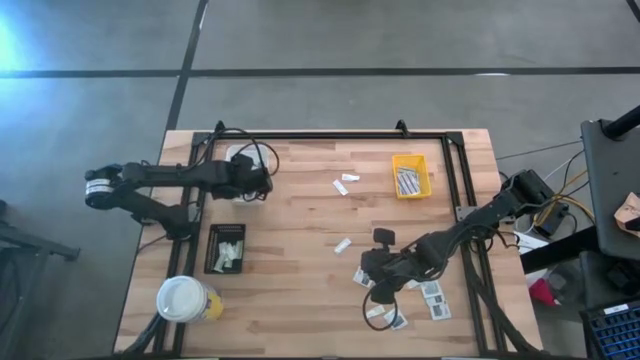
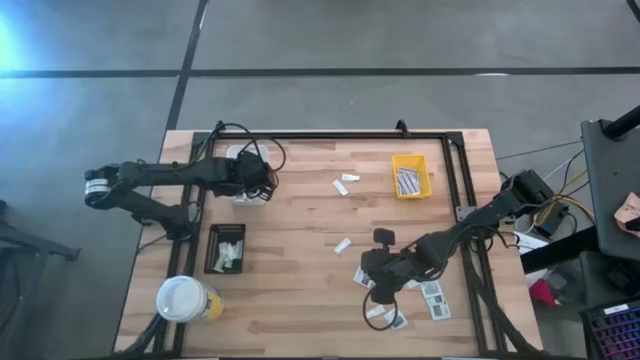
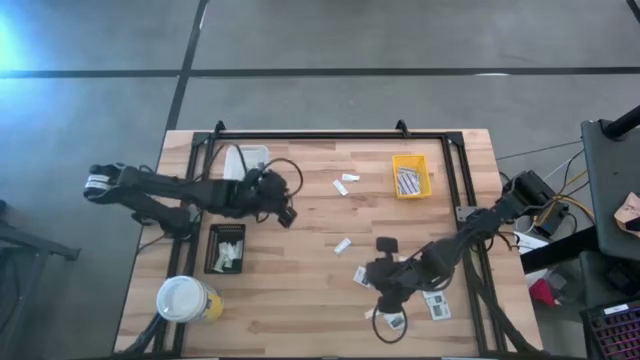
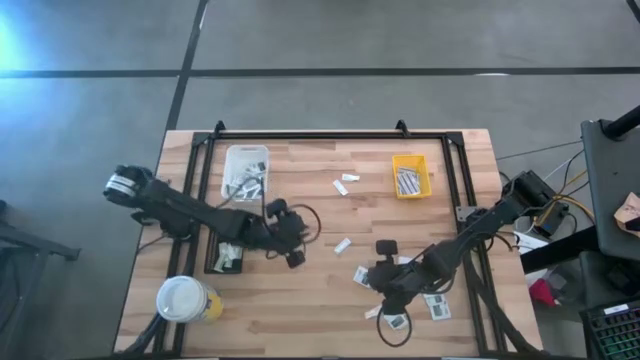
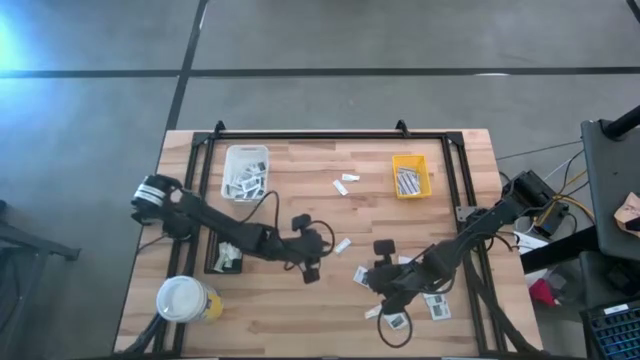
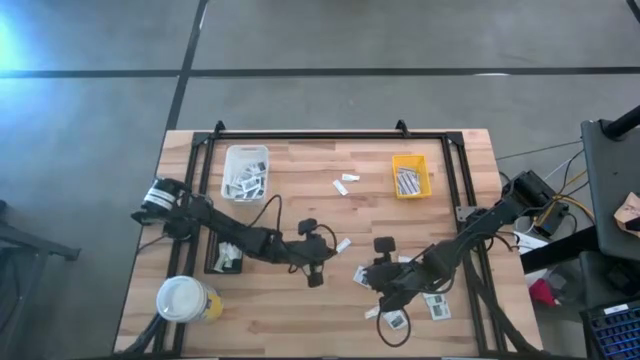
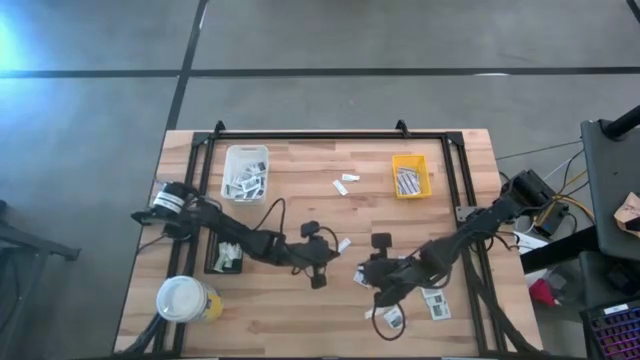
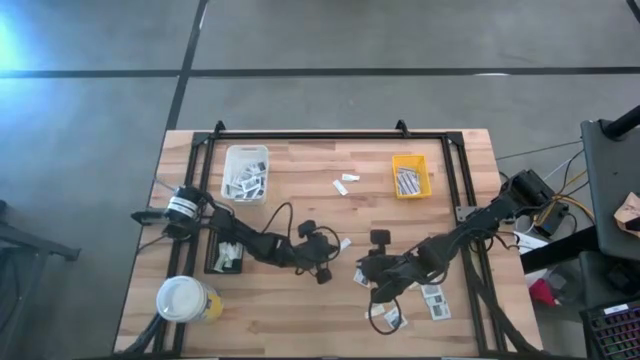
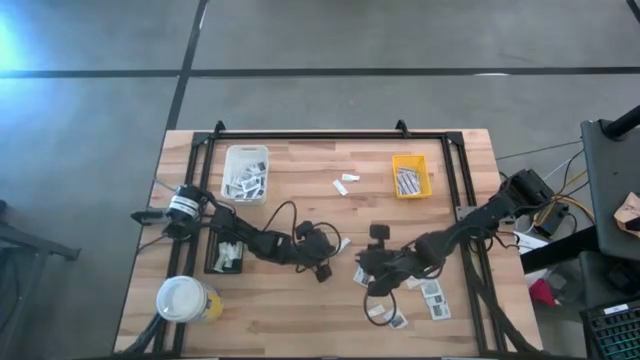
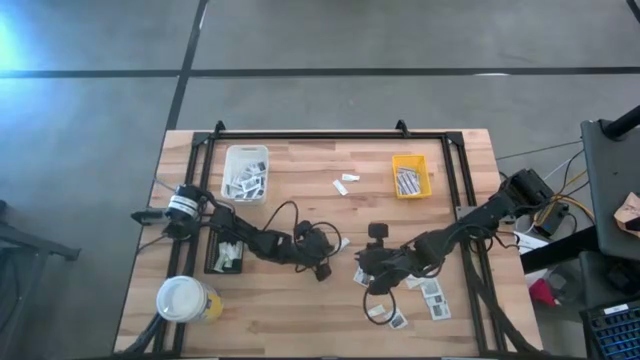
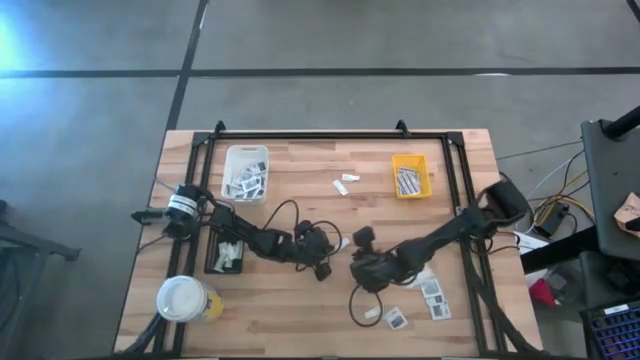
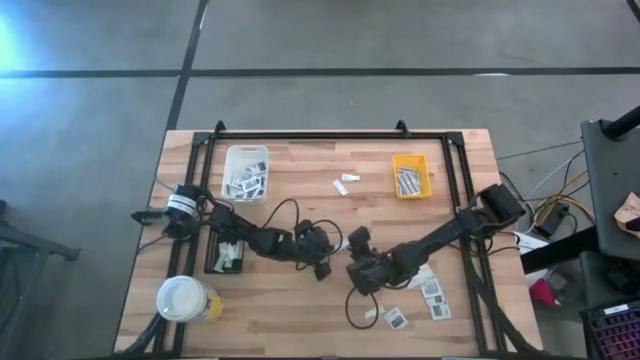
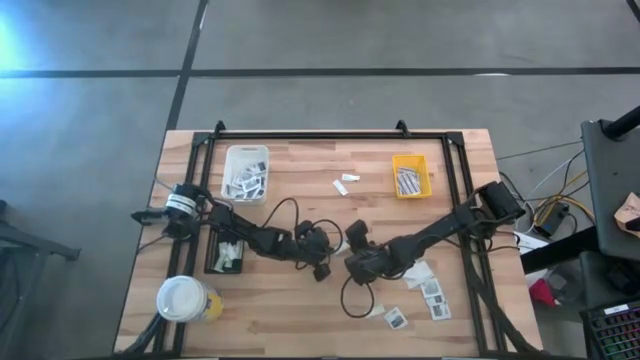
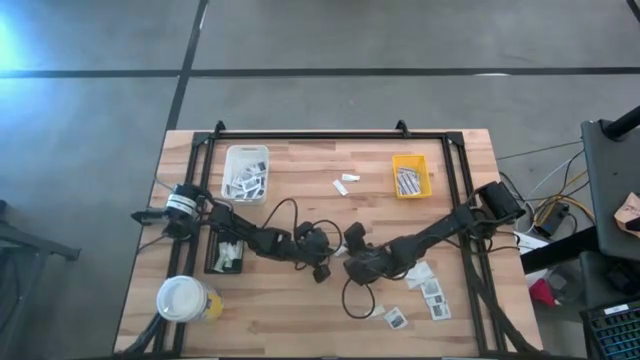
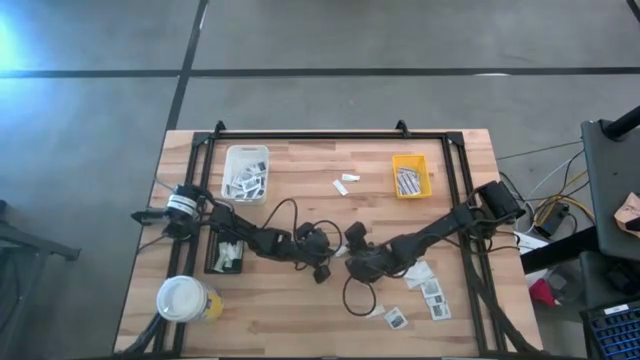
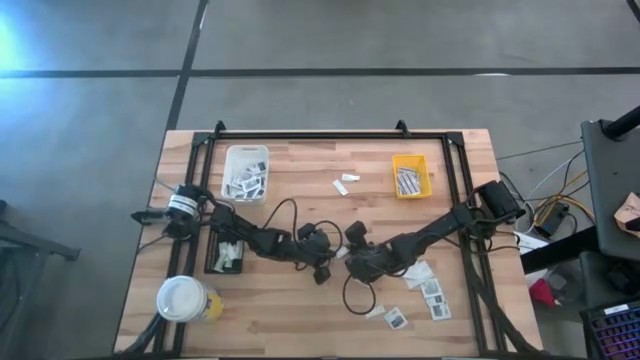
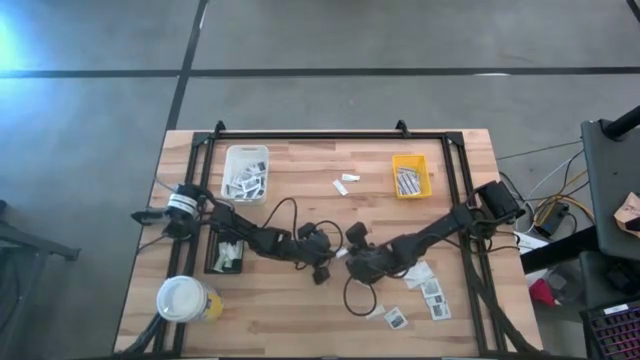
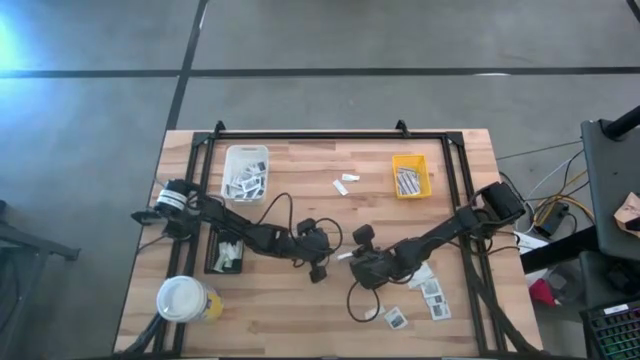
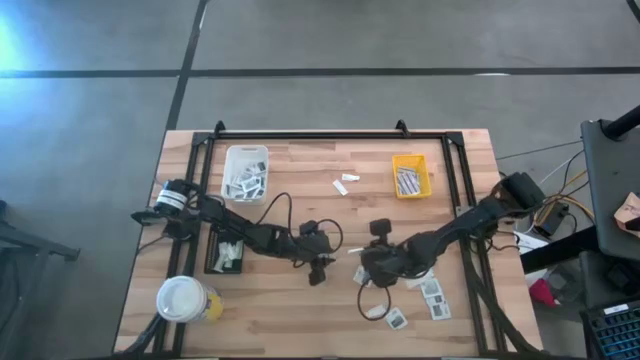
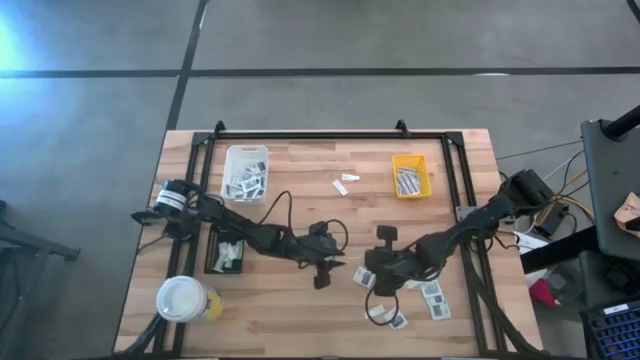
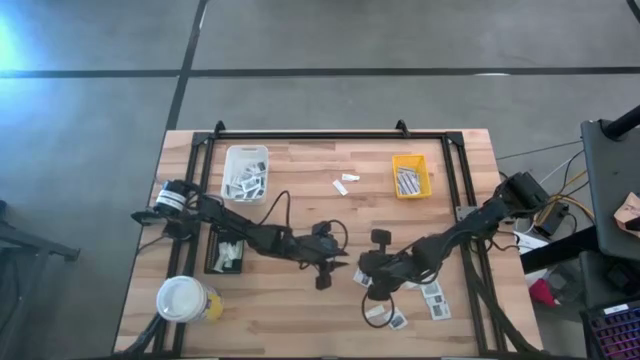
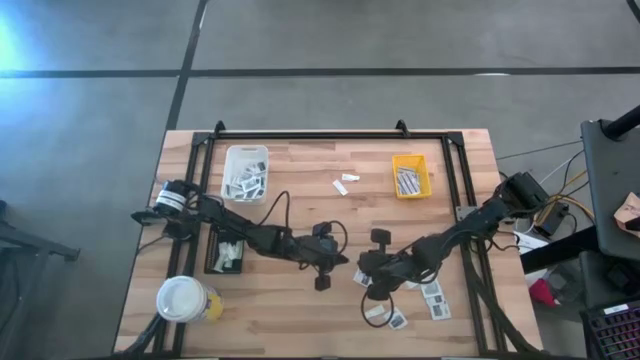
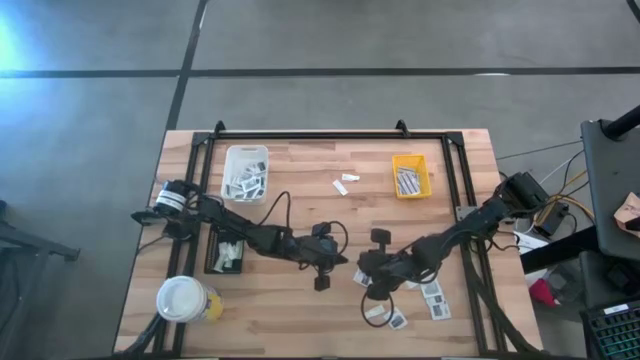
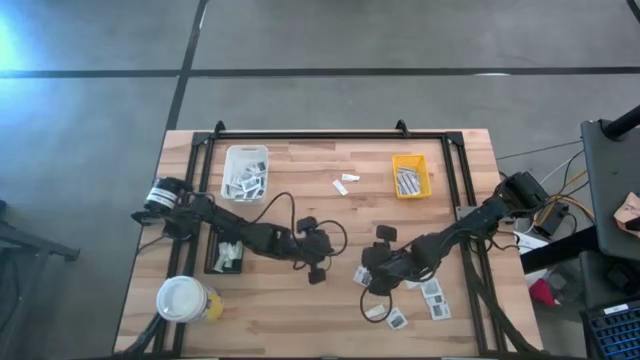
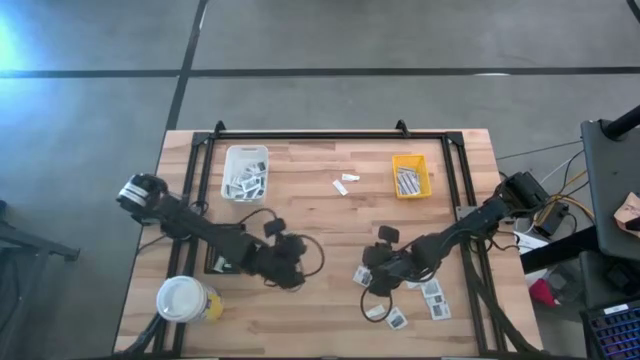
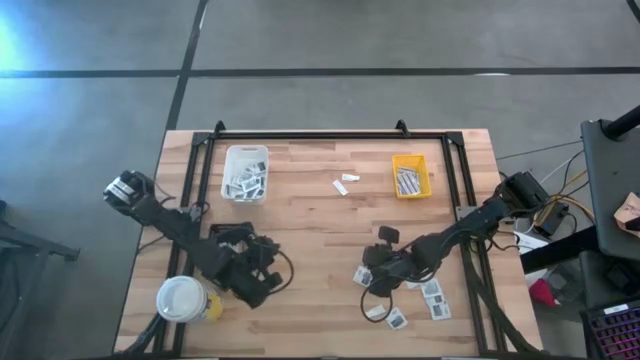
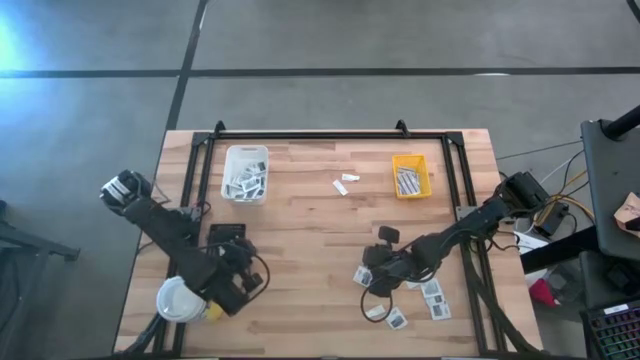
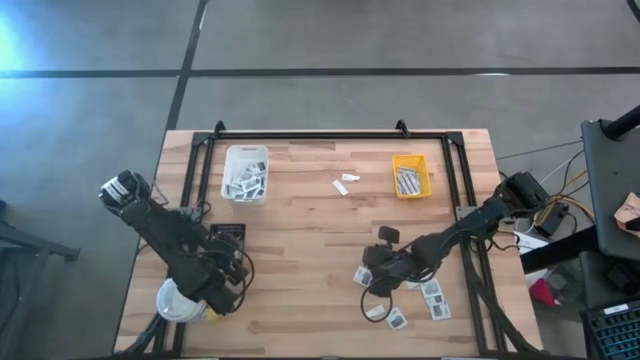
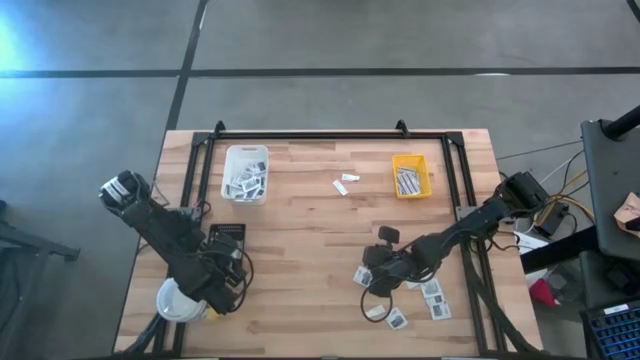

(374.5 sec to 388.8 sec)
Task: Pick & Place First Aid Supplies
Put the green bandage pack into the black bin

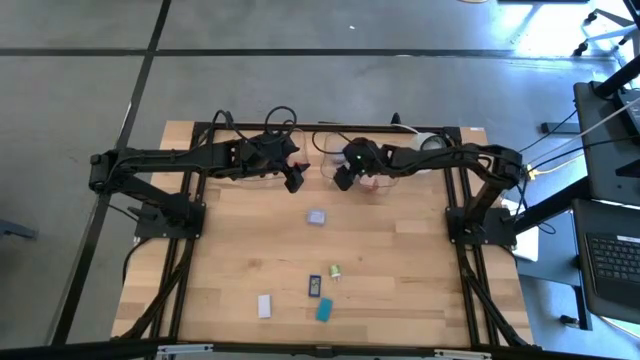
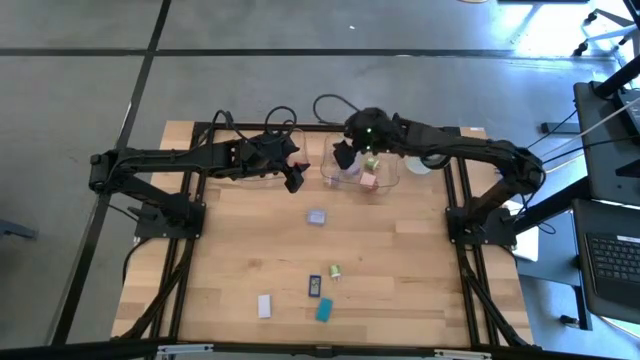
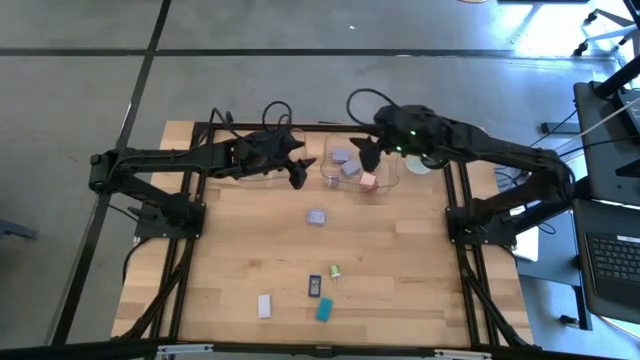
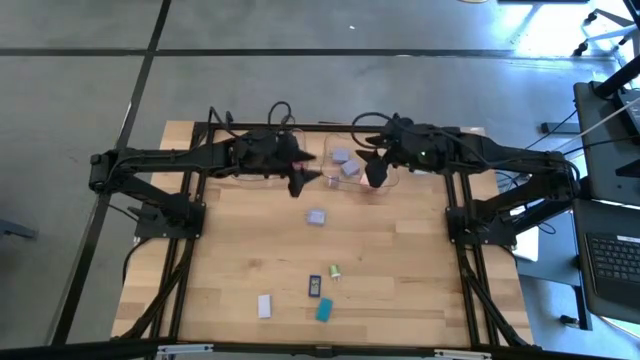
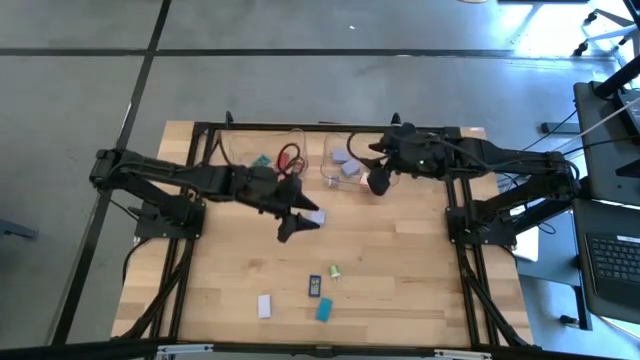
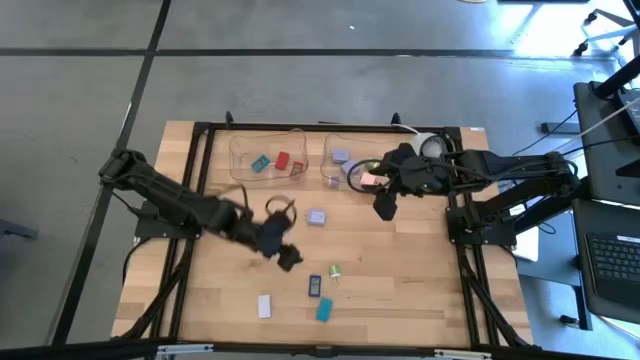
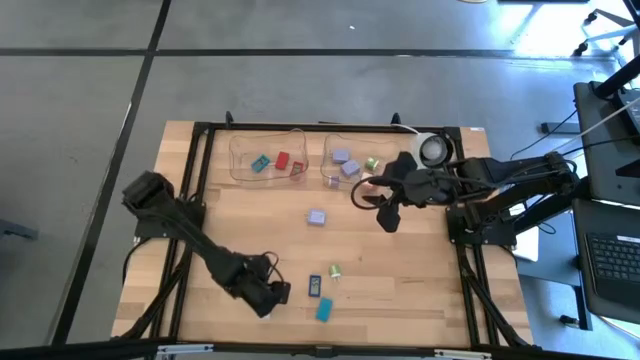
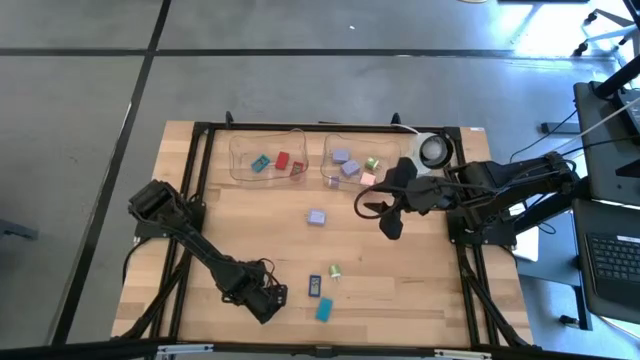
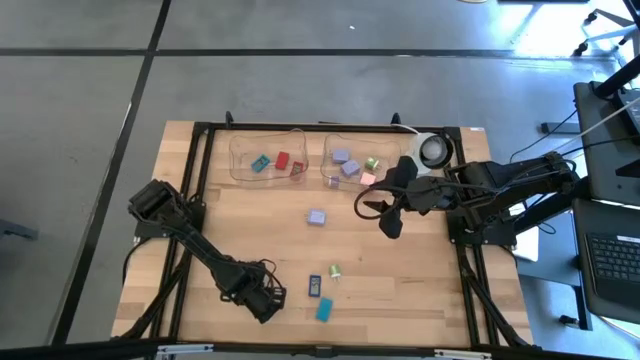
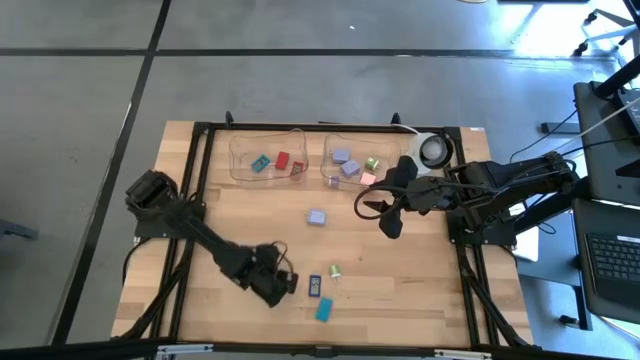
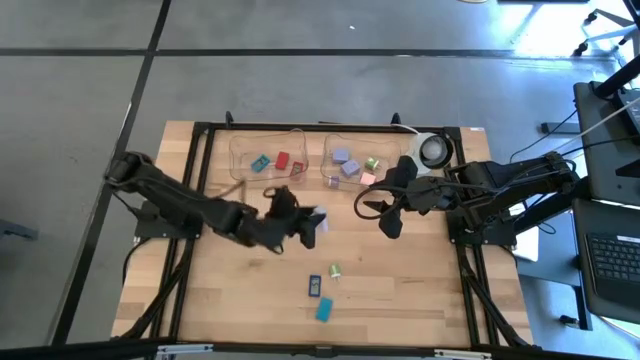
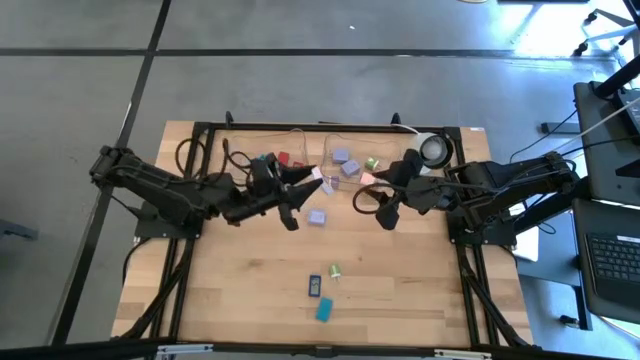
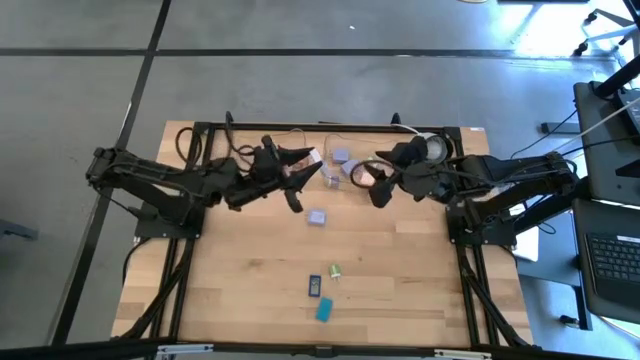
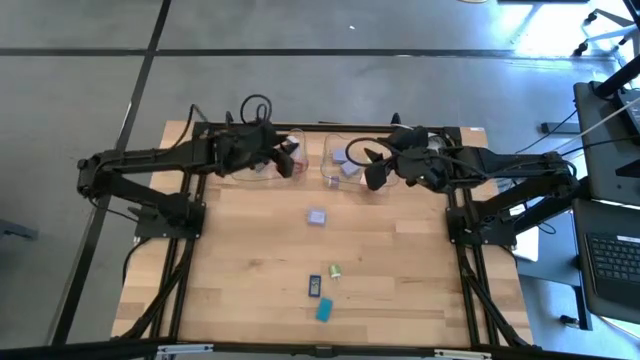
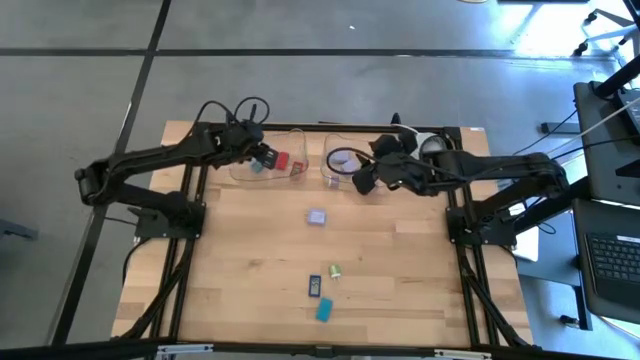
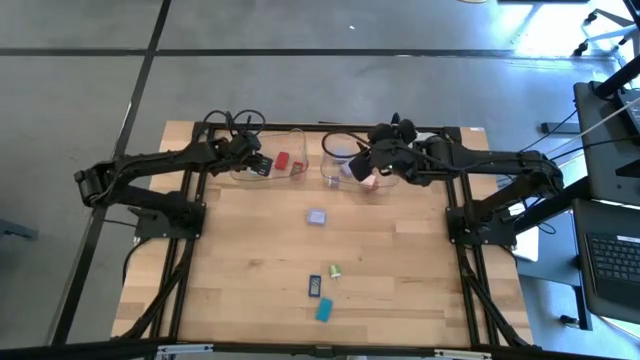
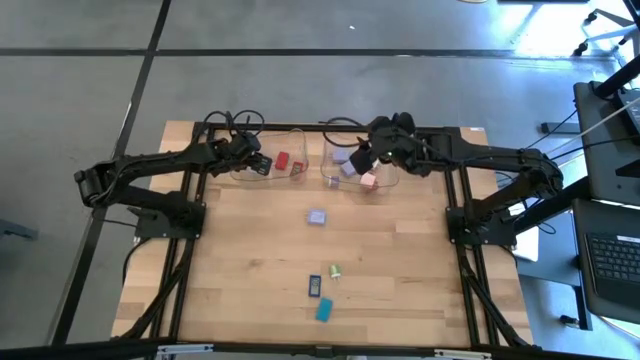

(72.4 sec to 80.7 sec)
Task: Pick & Place Office items
Put the white digital timer into the left transparent bin
